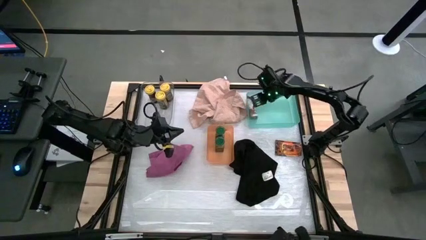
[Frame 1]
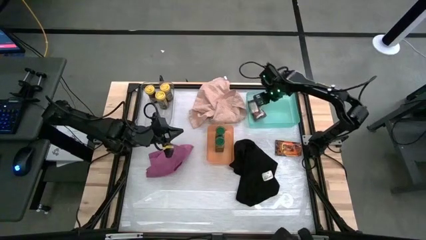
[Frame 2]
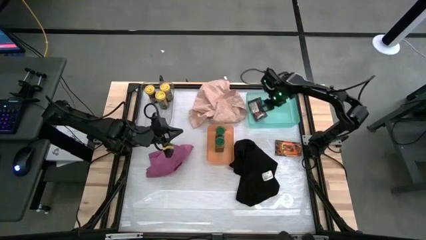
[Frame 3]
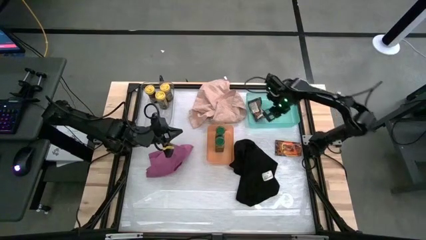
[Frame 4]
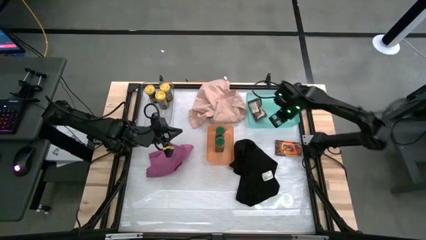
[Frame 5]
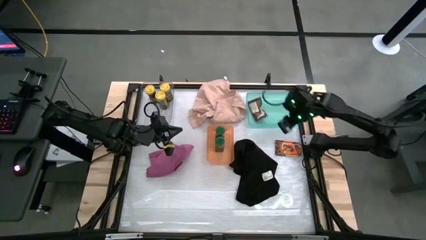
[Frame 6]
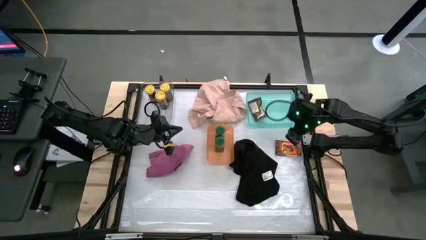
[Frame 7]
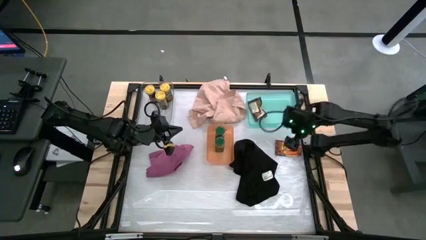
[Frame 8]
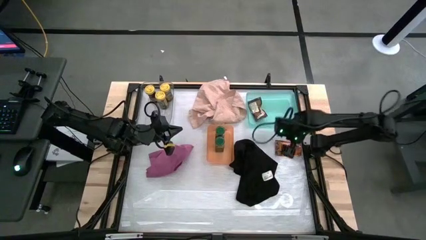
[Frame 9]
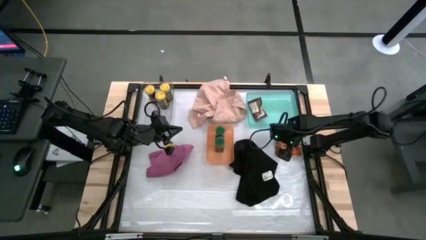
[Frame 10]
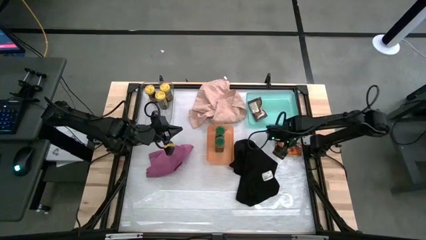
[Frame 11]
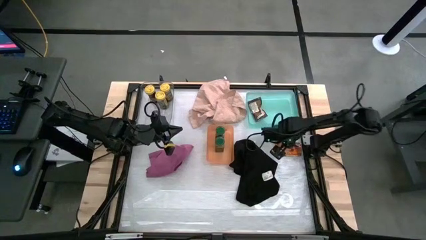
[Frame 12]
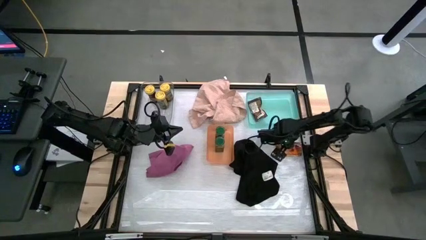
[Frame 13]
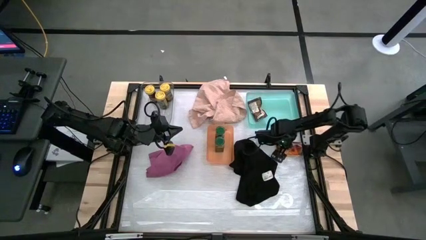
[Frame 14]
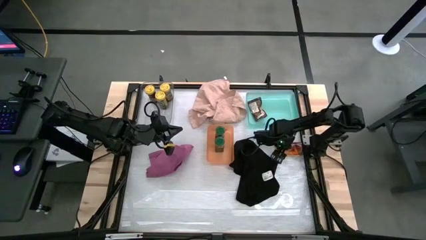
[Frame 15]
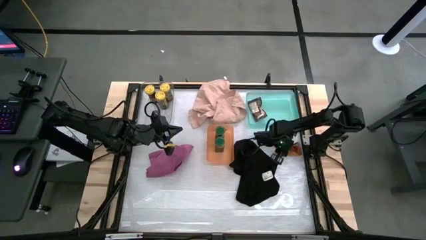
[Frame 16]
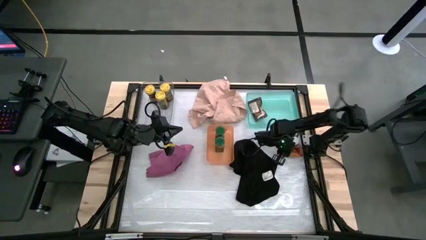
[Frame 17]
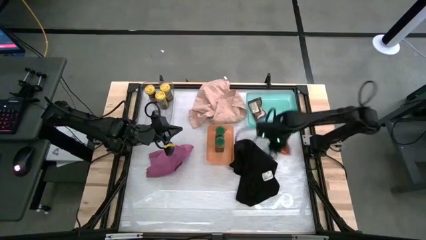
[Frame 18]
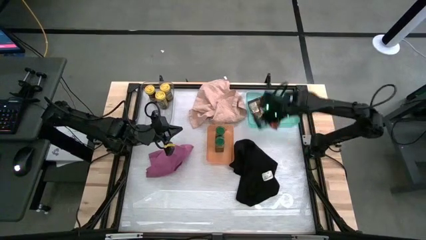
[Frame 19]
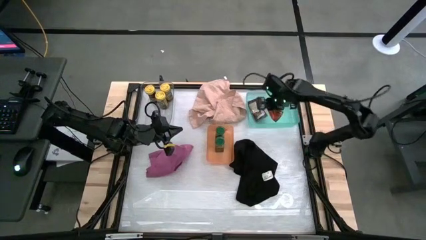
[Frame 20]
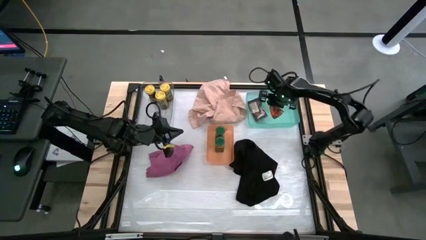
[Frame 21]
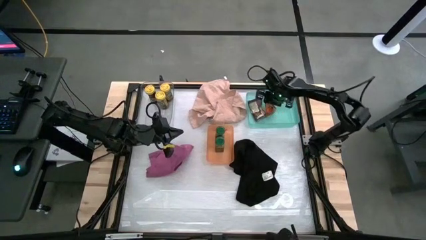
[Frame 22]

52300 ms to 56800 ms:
Task: Sort spices by type
Put the orange seasoning bag into the blue bin

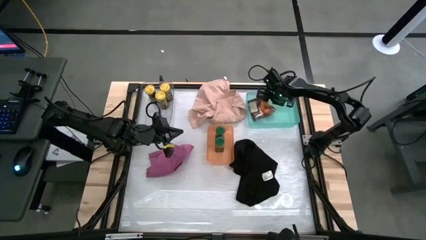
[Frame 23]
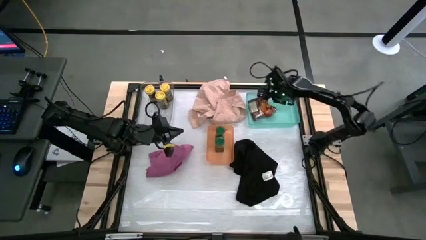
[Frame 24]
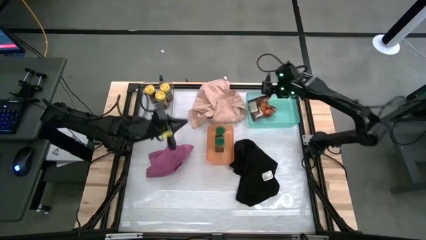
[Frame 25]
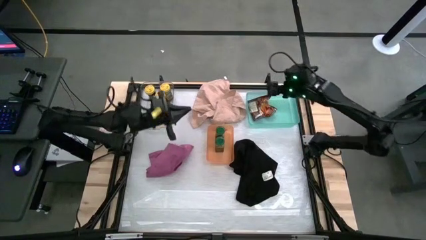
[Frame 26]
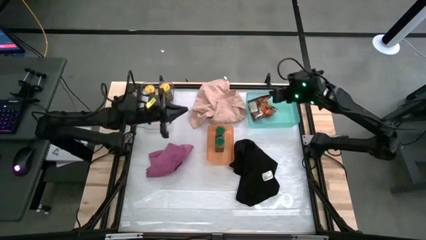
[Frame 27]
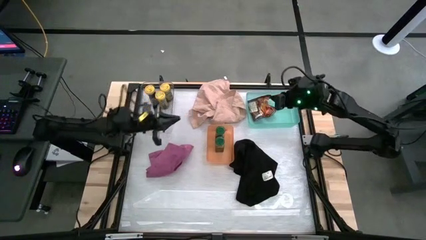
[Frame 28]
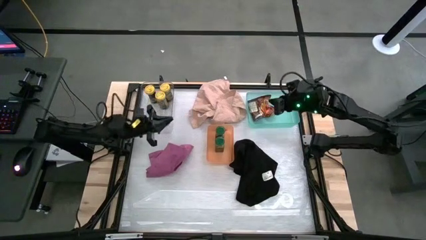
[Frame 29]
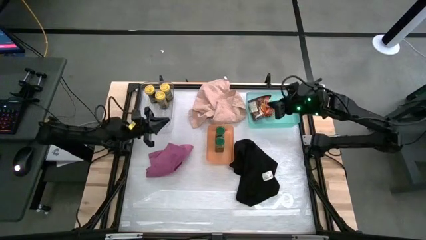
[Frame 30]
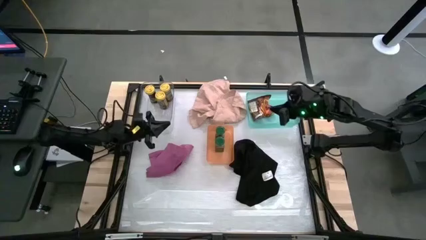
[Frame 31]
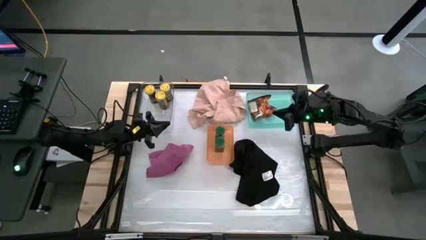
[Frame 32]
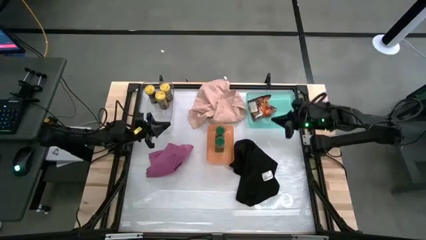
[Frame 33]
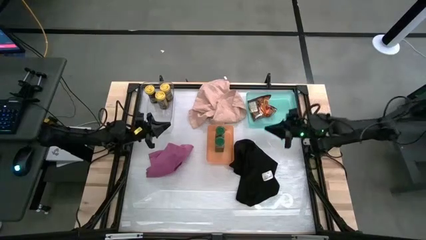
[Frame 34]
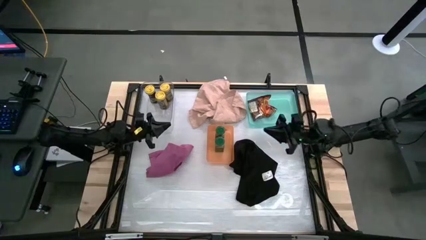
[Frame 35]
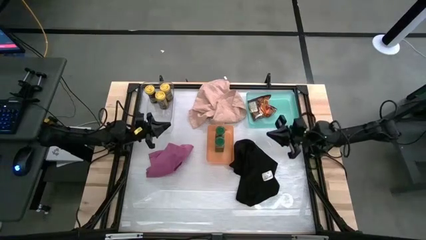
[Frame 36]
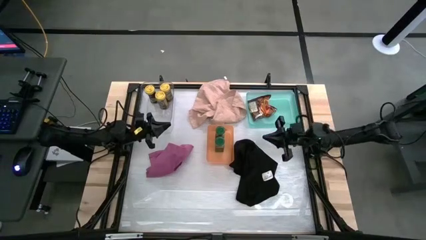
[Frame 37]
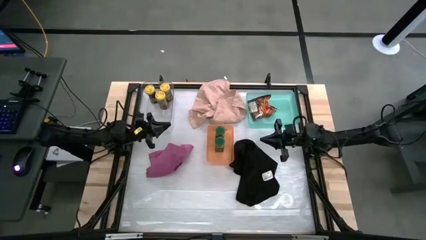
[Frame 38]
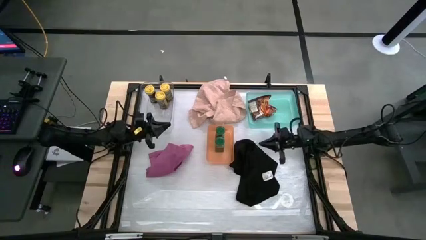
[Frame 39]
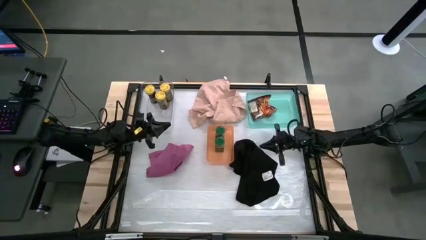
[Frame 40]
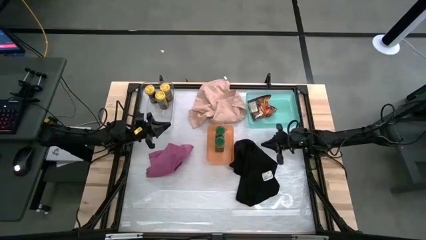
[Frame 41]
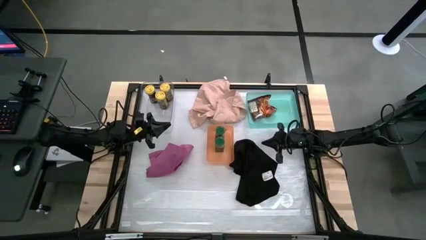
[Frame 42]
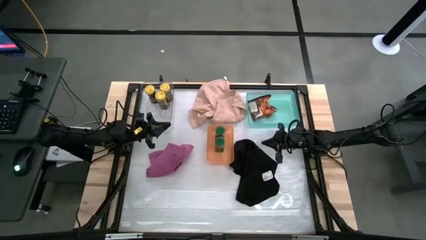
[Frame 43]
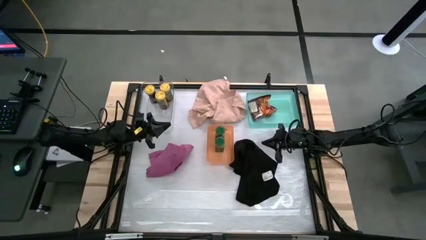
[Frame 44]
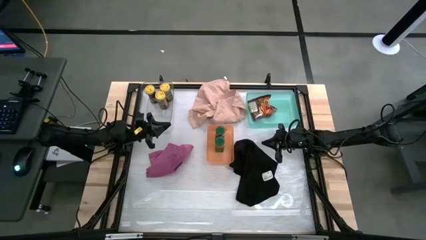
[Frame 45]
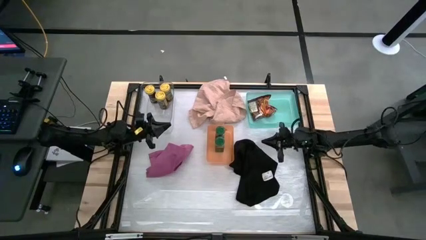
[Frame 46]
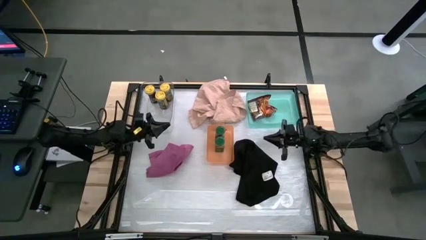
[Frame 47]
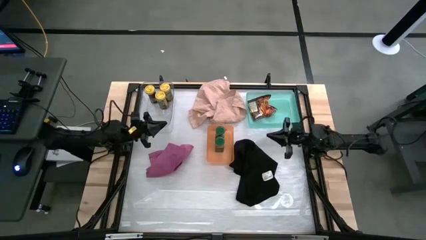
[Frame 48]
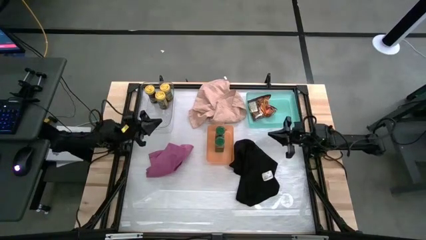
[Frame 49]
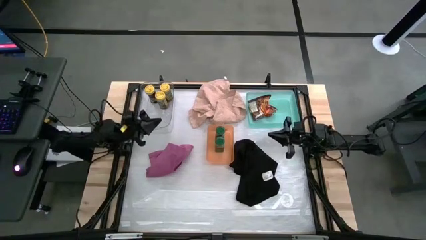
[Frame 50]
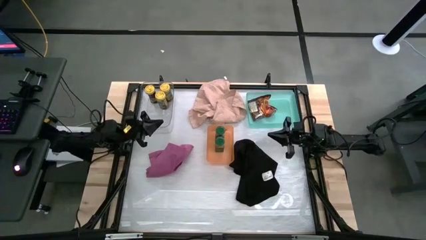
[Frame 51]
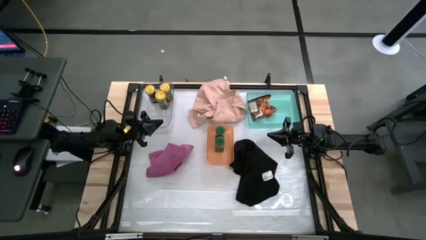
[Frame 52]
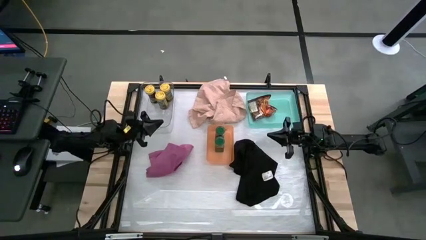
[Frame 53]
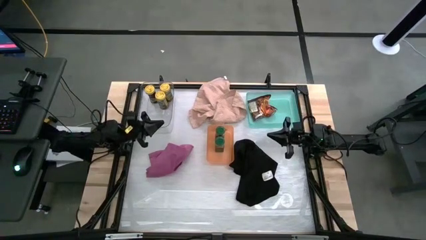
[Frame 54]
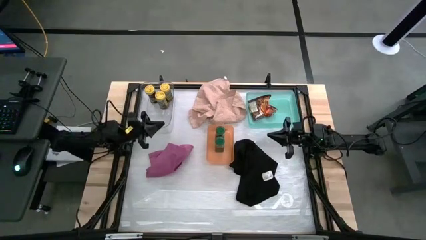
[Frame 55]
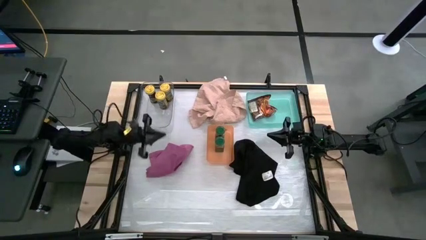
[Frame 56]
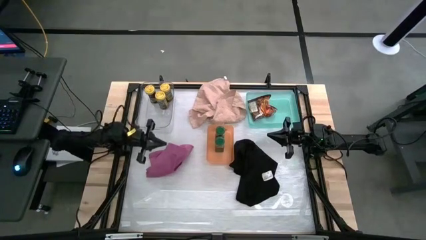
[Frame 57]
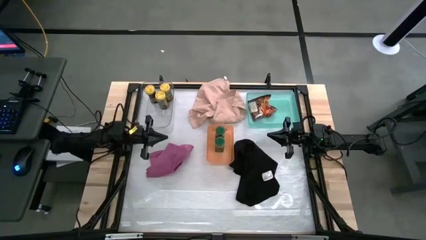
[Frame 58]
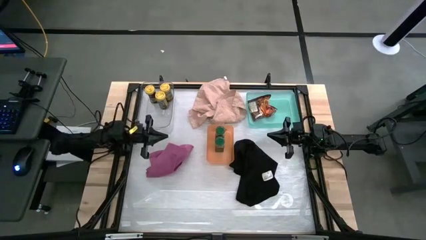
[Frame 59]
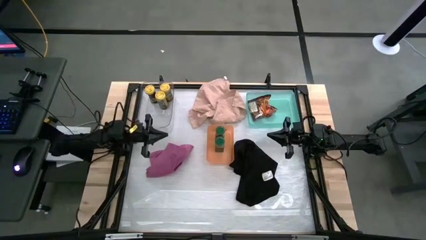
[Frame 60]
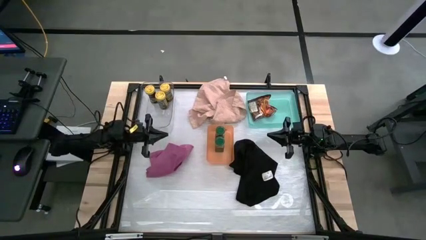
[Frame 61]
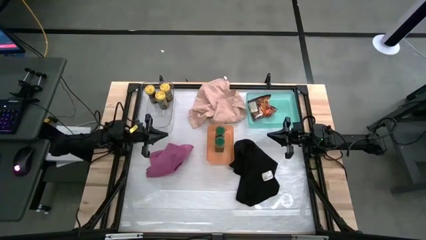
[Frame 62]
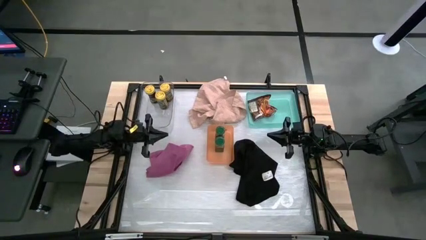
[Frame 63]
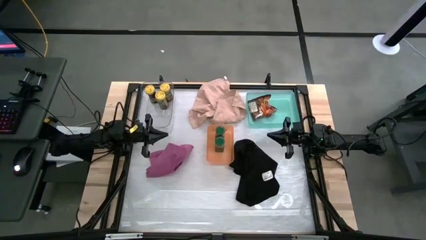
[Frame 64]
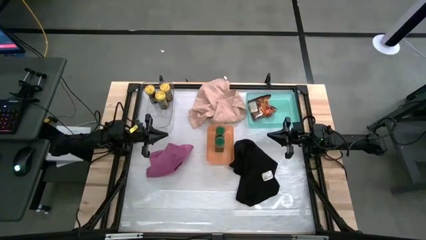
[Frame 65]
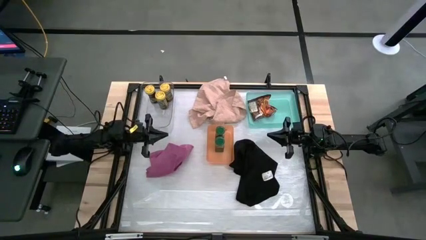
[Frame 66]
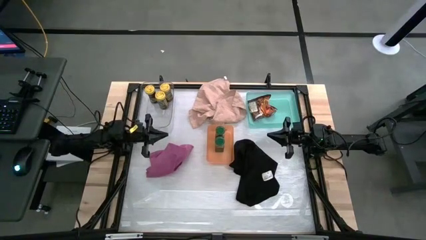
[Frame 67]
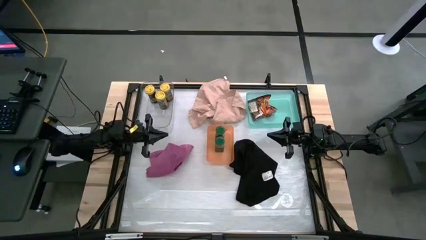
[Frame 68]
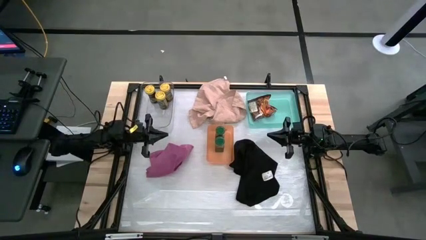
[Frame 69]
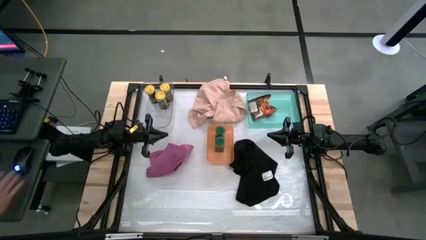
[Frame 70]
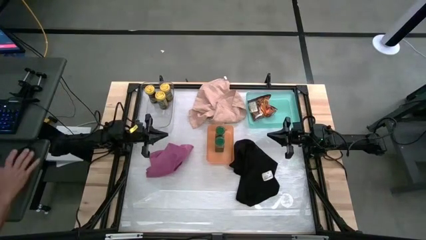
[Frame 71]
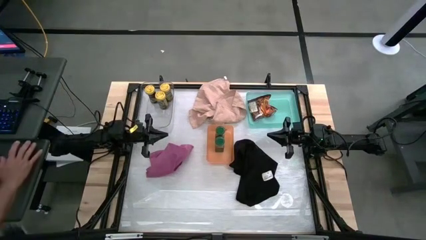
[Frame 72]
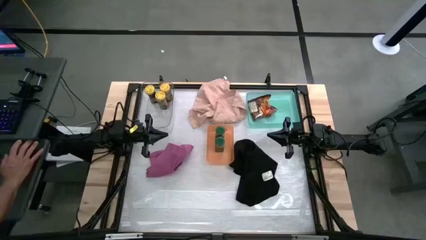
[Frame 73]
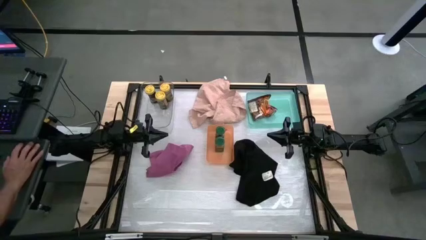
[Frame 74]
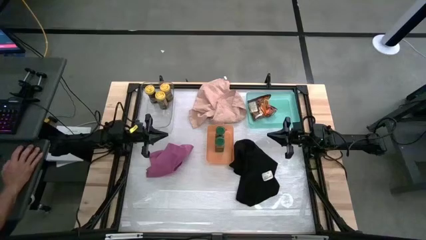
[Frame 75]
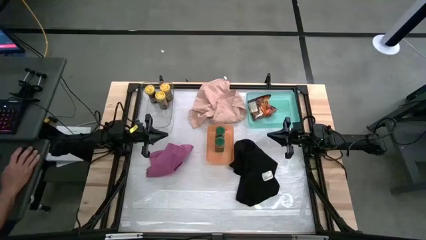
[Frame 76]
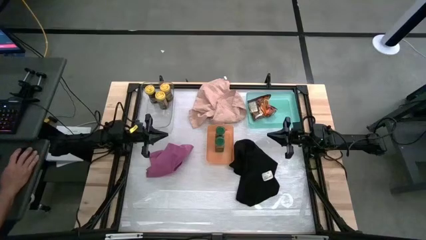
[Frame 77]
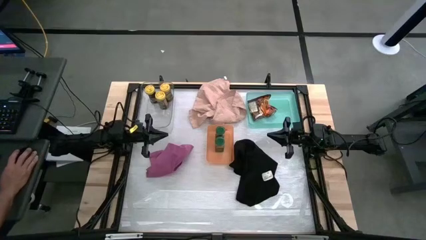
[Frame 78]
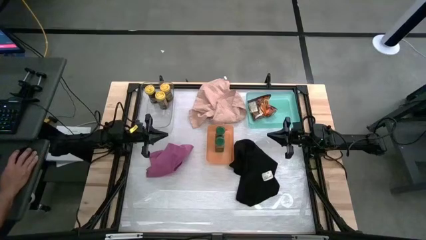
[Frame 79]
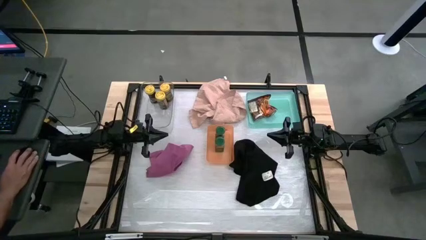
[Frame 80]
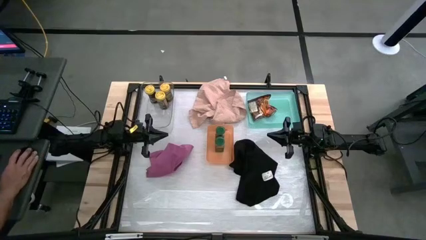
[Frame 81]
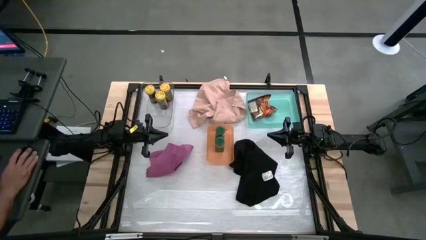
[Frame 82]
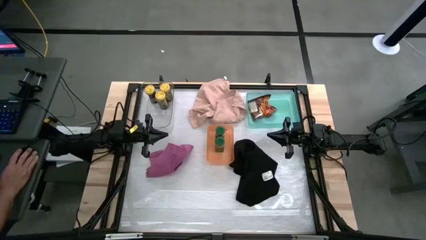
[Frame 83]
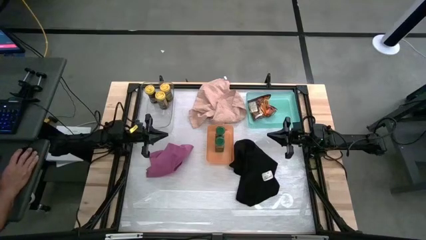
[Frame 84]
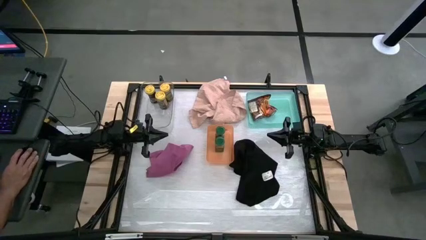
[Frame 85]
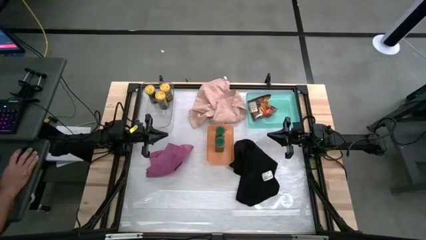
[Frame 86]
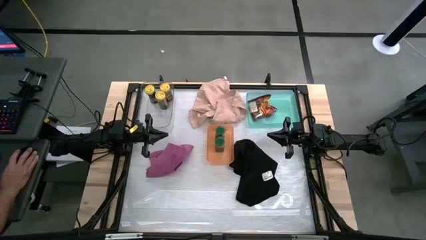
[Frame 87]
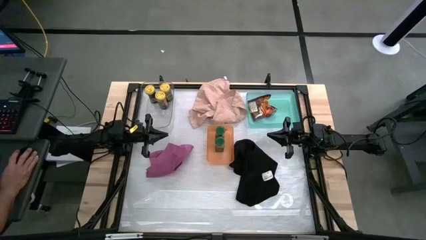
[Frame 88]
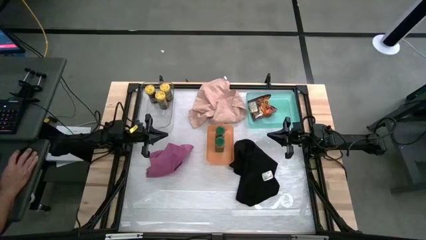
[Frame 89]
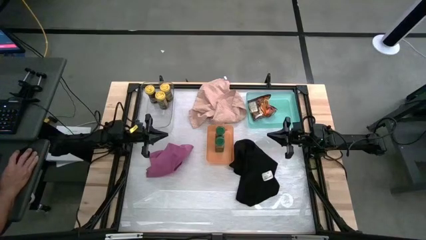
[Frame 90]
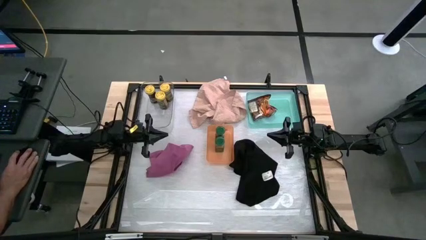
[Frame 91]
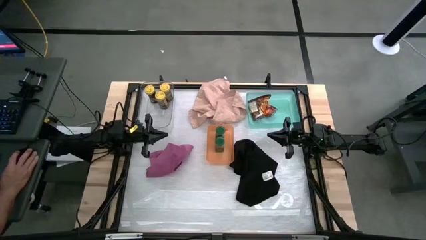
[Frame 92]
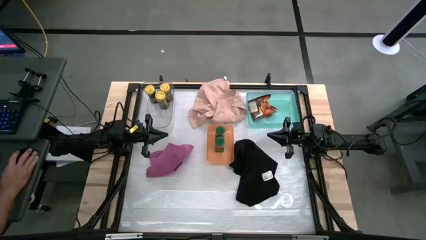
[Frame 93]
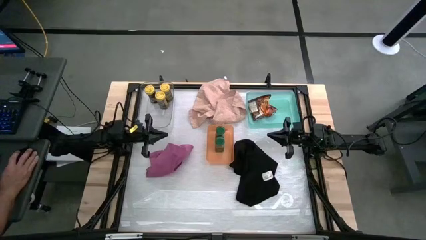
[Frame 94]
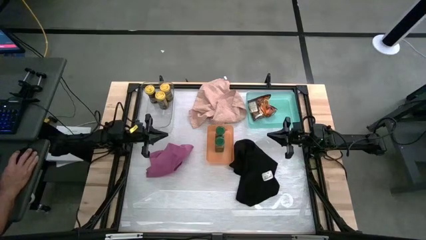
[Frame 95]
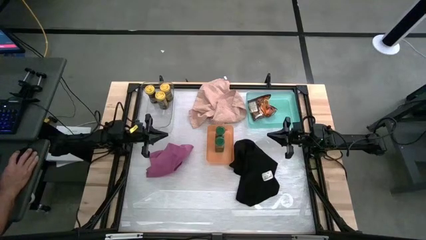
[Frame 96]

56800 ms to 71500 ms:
Return to Home Position
